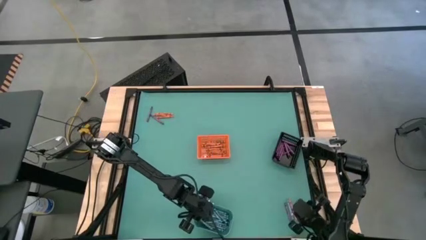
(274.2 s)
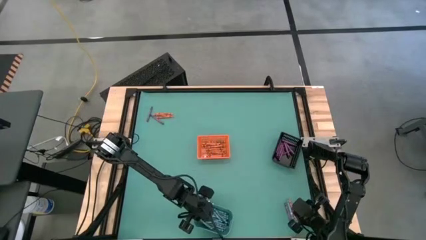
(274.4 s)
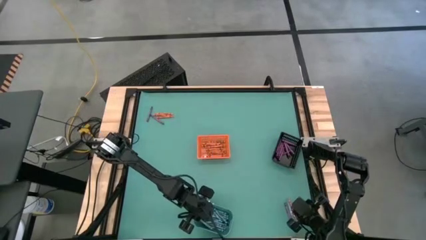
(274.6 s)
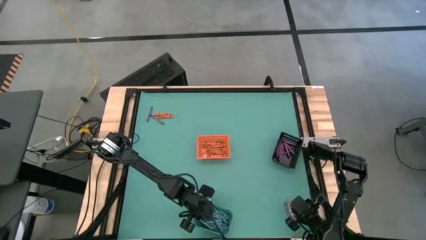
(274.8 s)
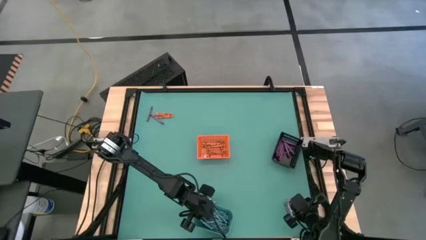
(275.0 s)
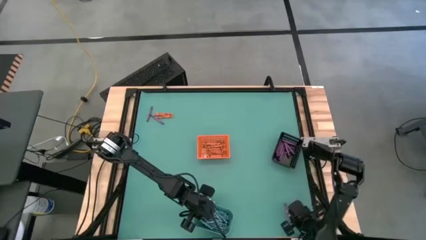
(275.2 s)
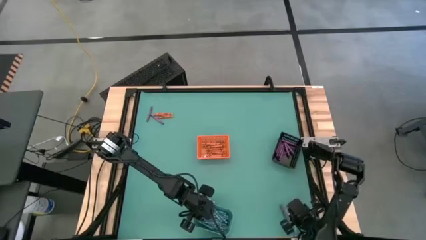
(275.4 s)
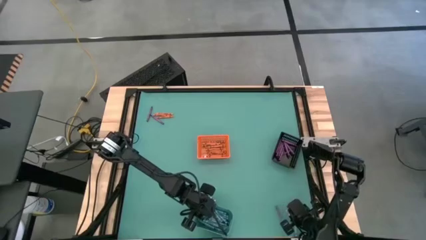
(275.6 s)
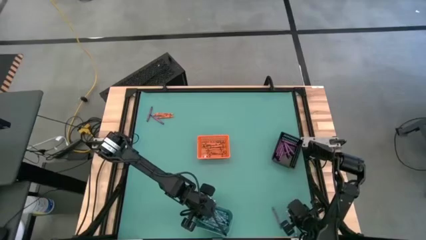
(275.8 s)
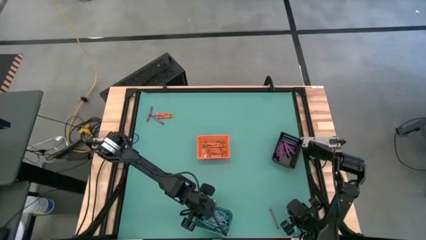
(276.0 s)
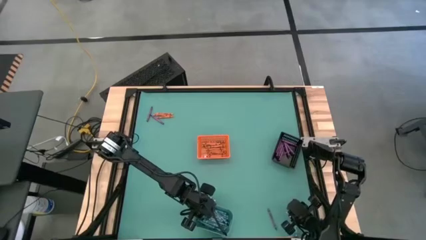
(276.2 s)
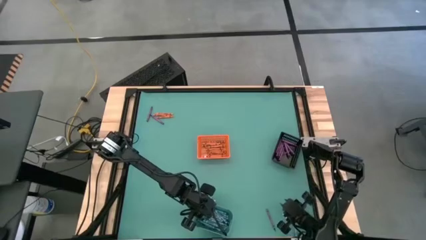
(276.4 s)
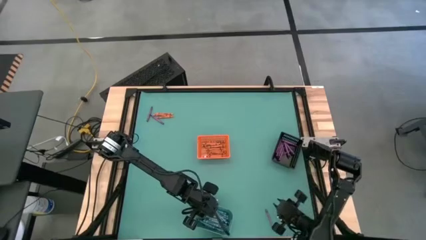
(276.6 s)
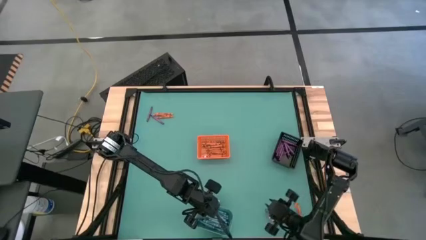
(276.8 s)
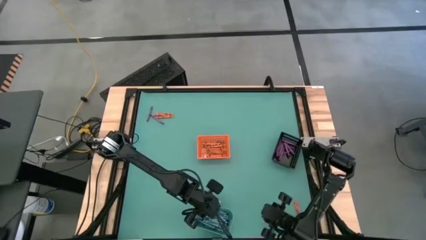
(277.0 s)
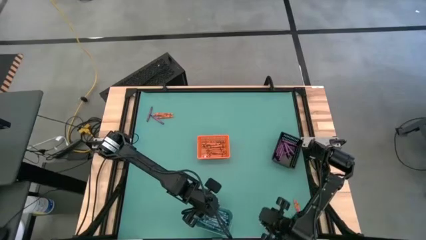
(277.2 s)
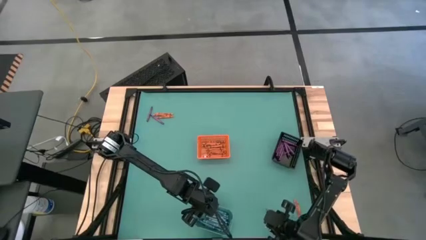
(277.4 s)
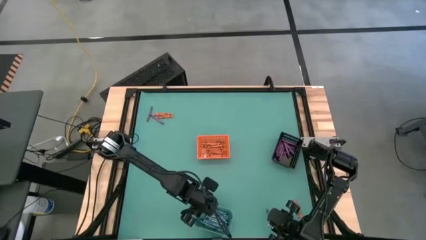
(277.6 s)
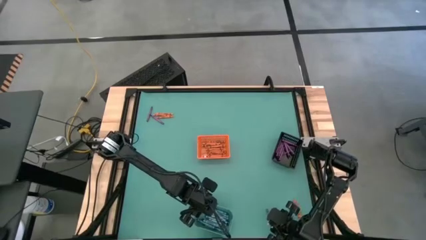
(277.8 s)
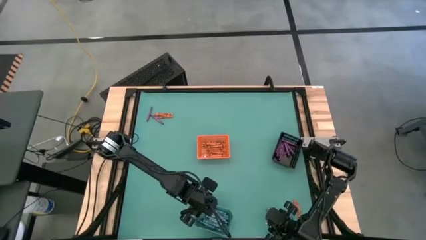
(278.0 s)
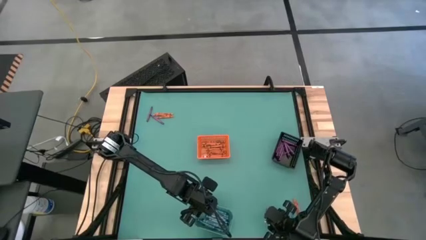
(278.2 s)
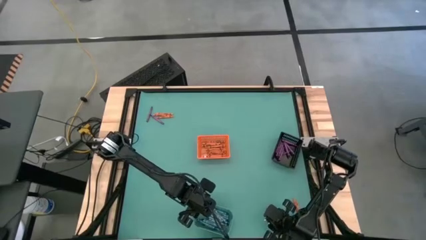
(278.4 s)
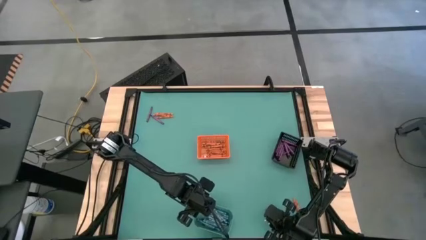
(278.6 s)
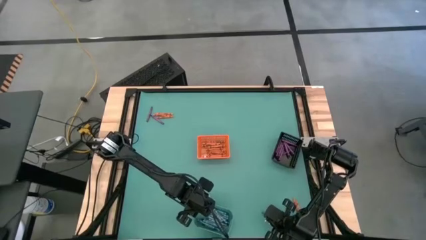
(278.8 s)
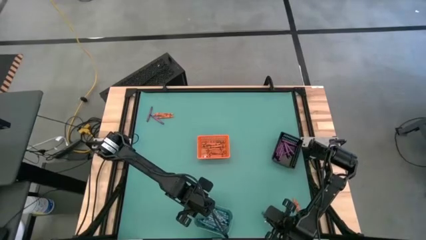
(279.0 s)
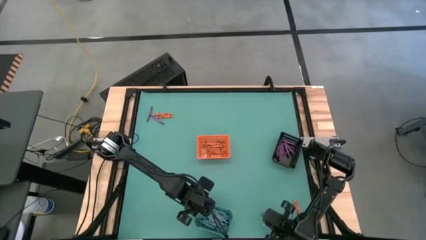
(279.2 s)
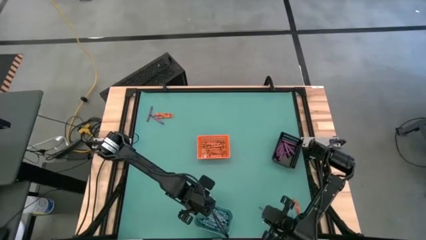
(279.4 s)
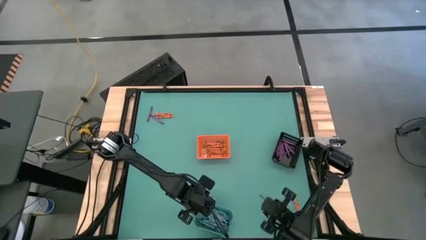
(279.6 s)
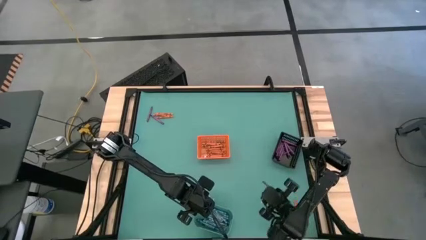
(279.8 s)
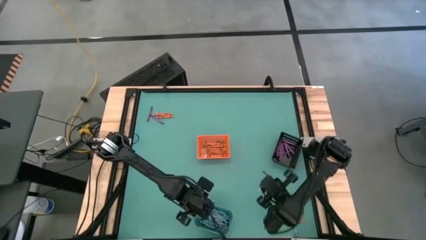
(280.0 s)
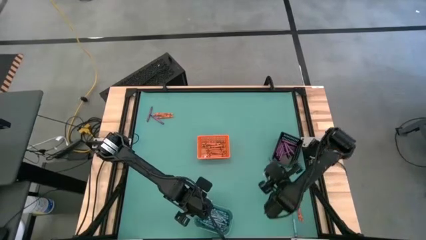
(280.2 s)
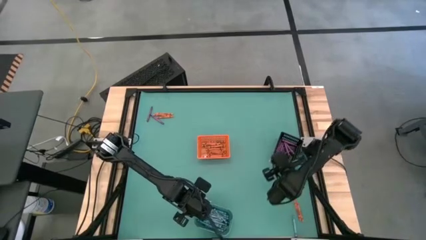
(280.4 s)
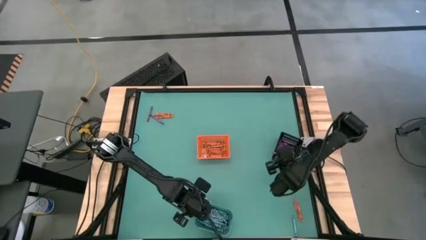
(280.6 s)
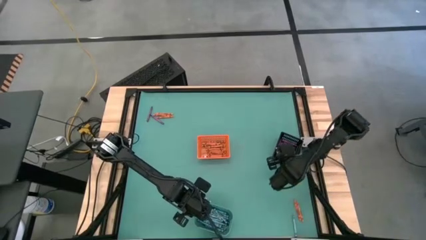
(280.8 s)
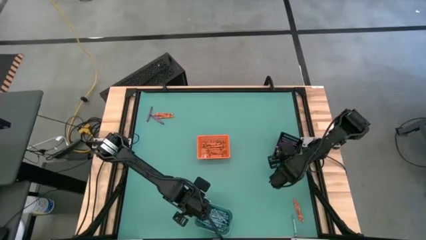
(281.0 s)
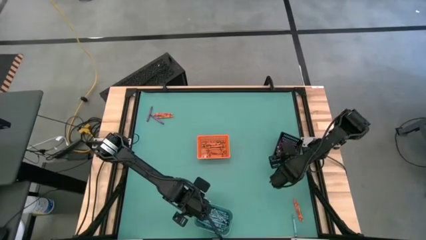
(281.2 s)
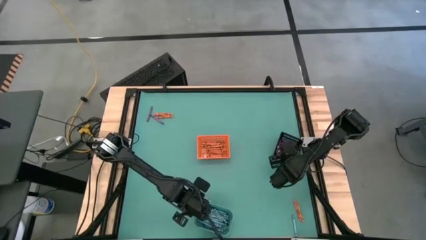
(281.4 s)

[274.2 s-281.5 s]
Task: Sort crayons
Put the purple crayon into the black bin

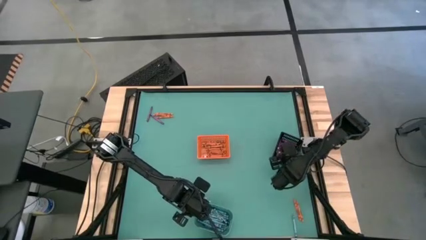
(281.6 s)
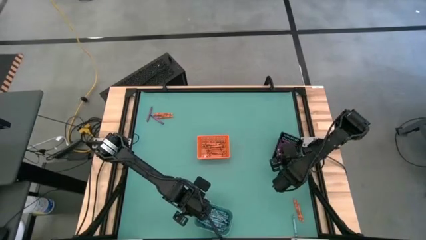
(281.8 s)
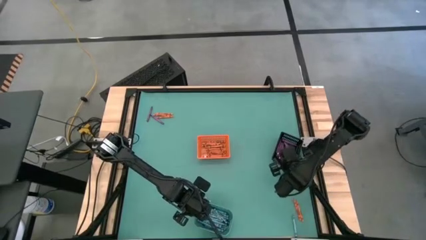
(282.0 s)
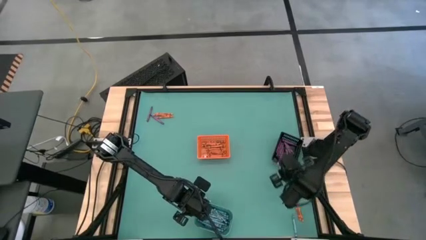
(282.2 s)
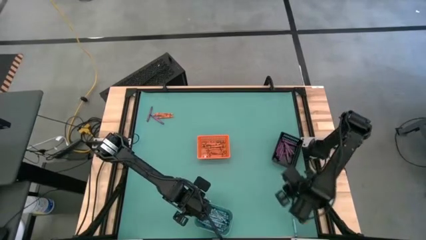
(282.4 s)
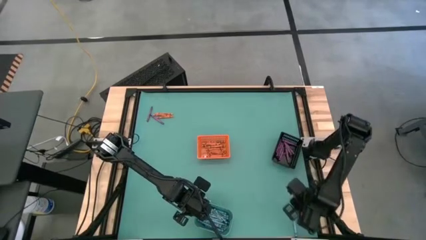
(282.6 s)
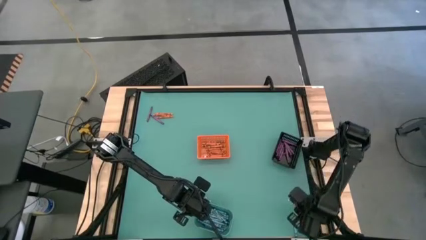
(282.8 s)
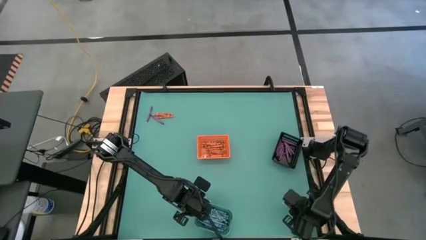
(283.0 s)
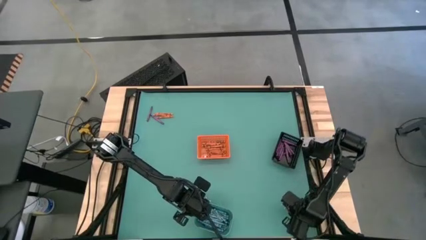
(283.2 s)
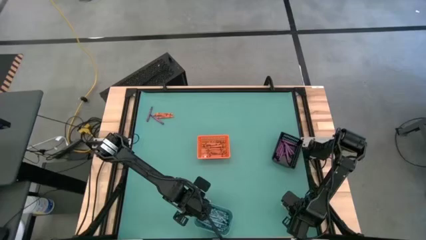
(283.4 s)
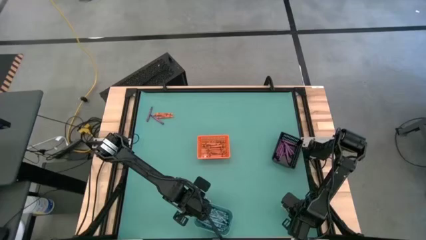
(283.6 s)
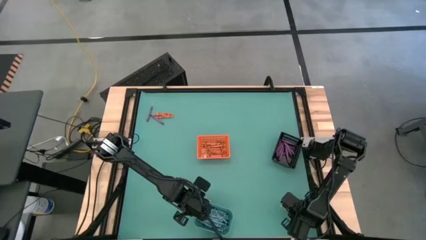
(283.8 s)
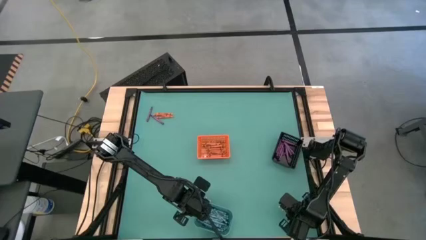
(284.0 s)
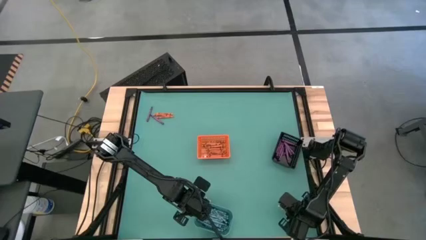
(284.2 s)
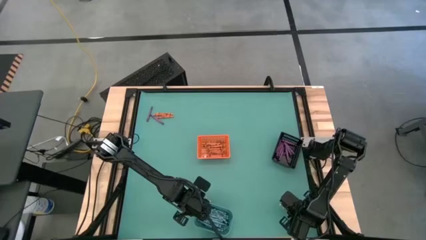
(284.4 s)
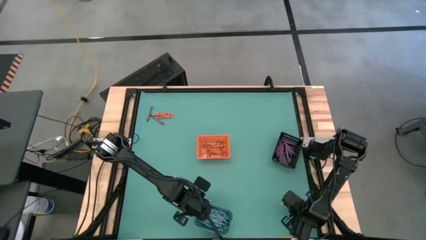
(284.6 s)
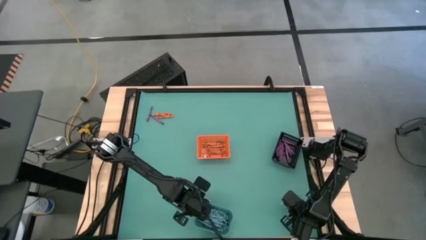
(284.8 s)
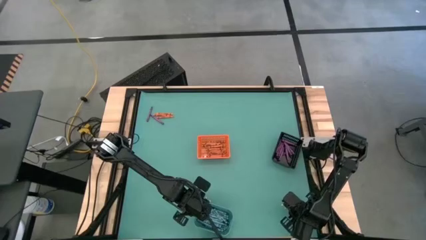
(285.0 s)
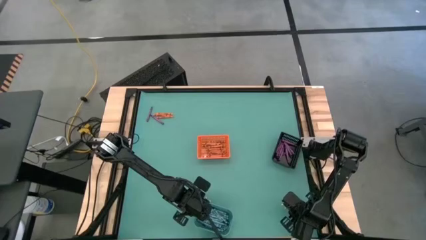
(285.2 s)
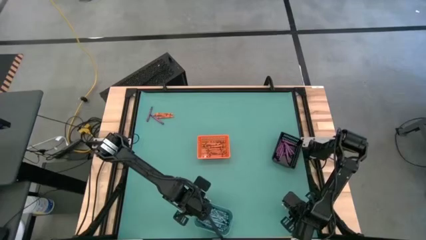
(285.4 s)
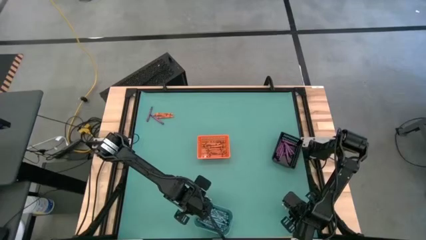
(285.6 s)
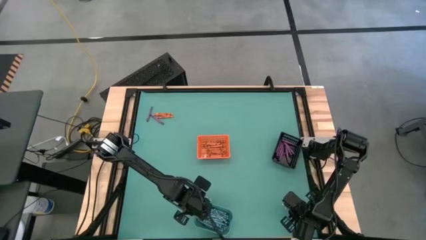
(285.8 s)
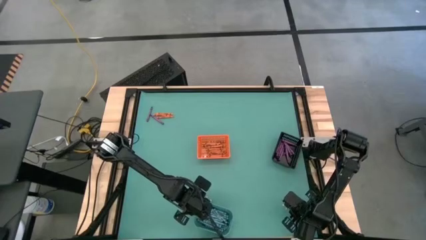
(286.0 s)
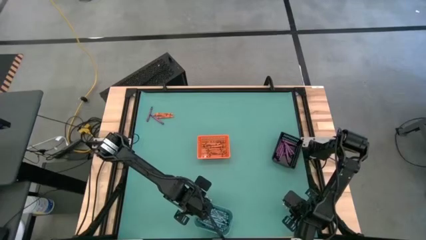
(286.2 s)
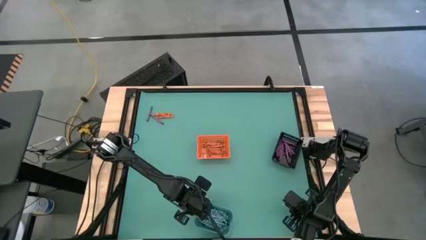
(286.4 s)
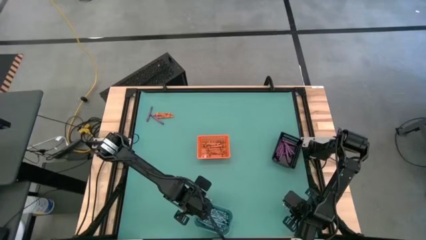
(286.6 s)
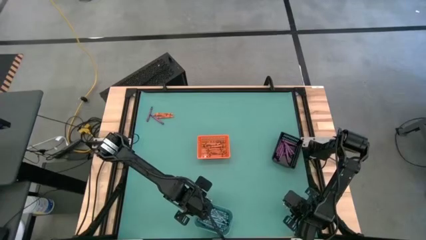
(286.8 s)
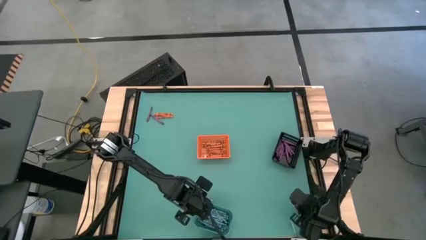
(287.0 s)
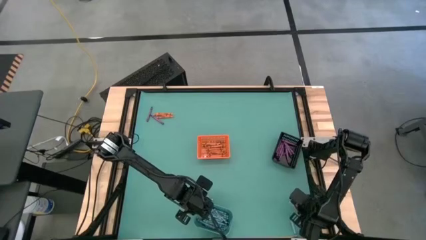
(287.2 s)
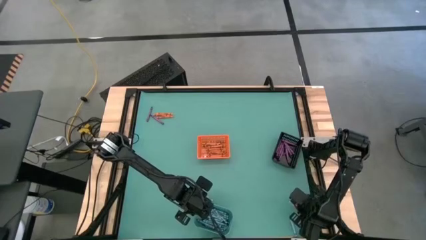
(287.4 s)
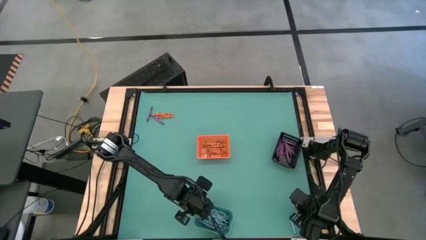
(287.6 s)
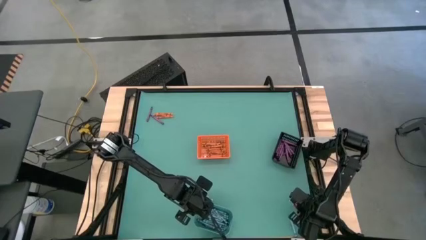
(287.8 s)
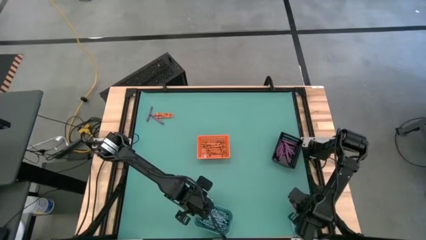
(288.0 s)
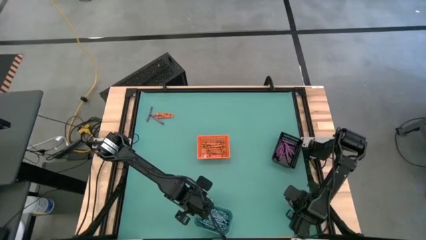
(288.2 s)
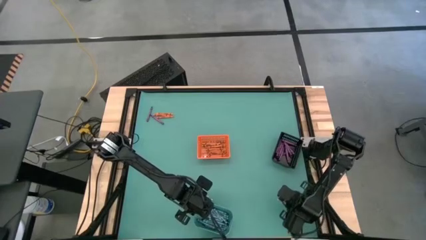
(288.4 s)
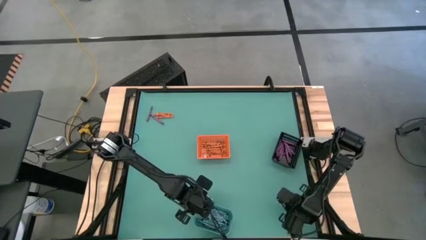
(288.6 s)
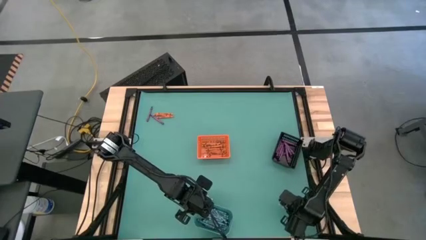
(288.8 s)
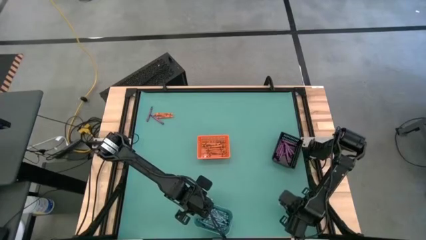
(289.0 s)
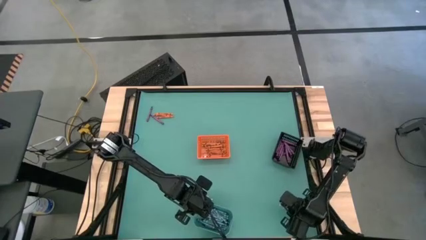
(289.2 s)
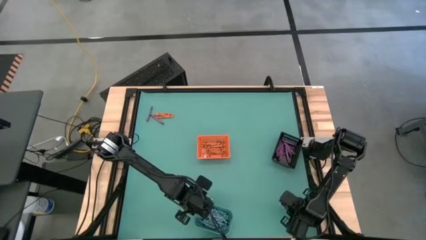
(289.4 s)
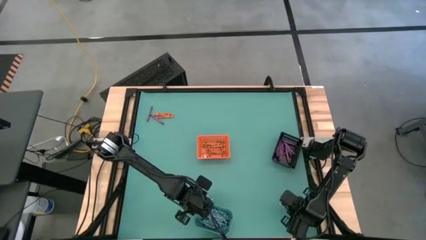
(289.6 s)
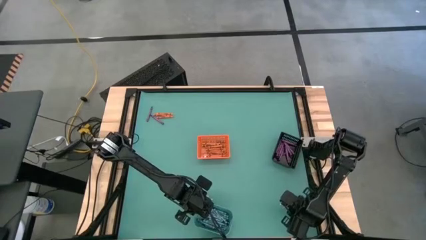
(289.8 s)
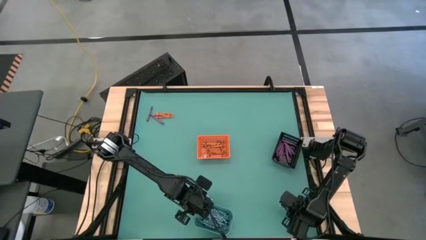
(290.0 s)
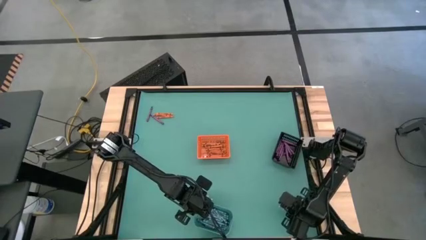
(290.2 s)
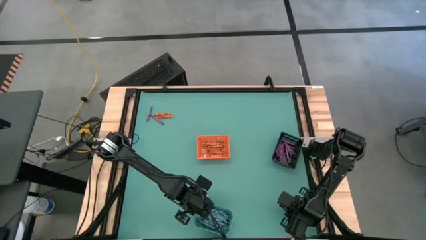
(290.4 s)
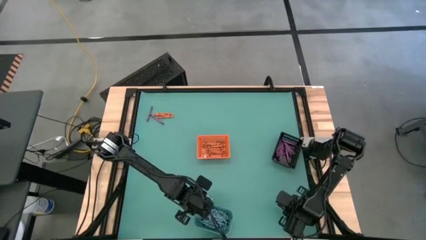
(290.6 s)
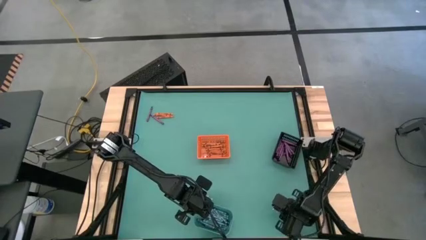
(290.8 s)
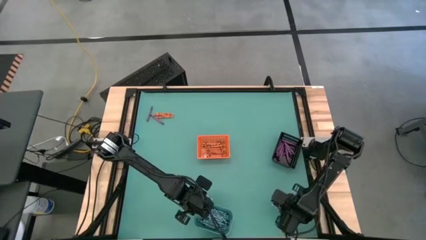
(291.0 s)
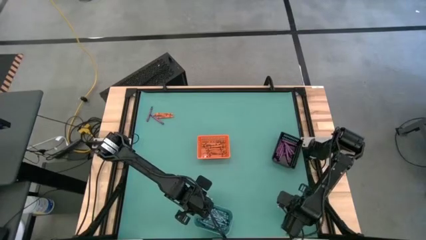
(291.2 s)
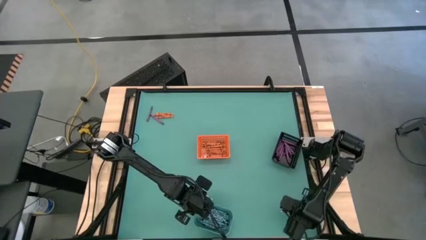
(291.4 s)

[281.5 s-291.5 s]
Put the orange crayon into the orange bin
